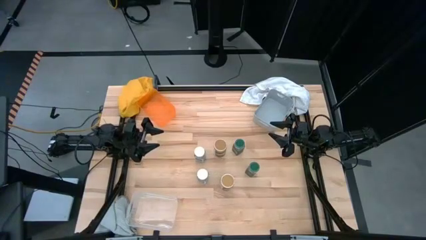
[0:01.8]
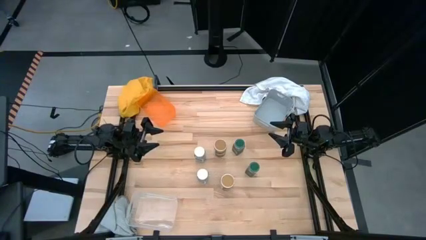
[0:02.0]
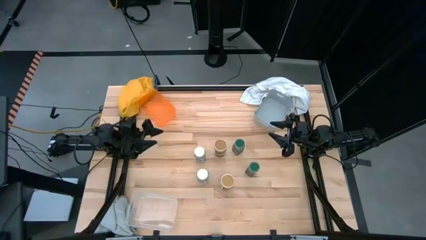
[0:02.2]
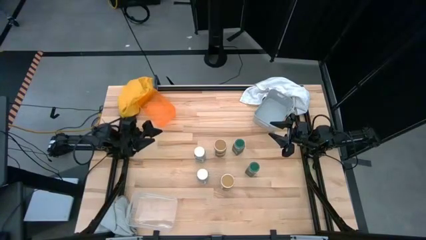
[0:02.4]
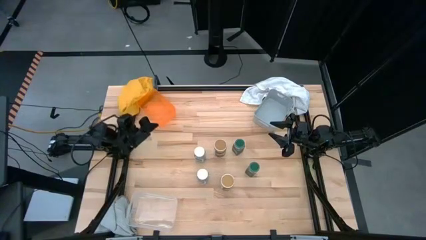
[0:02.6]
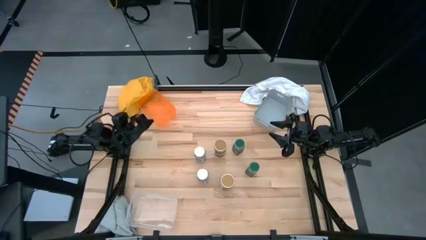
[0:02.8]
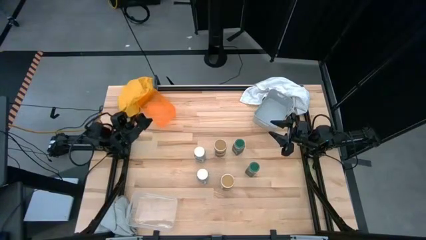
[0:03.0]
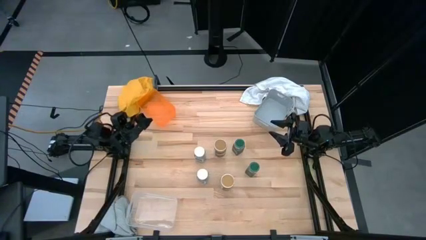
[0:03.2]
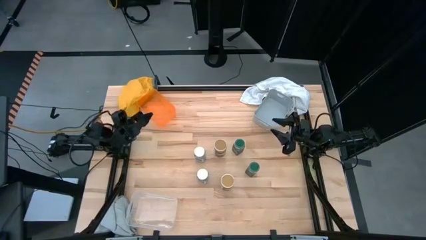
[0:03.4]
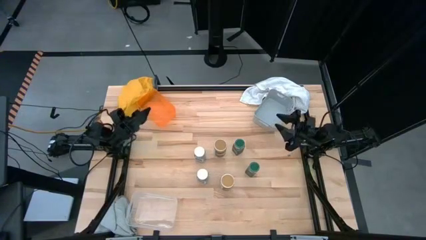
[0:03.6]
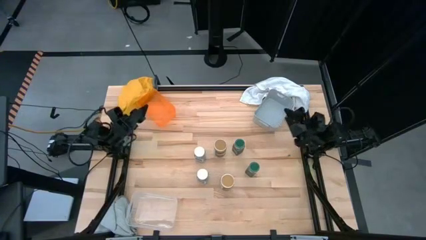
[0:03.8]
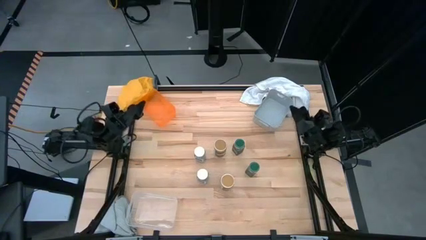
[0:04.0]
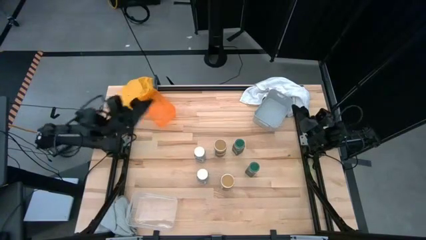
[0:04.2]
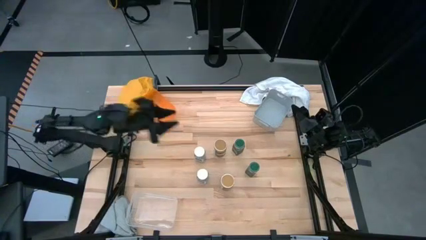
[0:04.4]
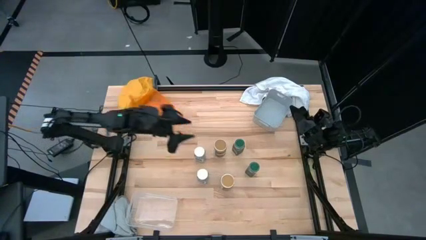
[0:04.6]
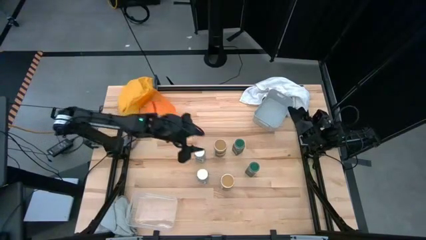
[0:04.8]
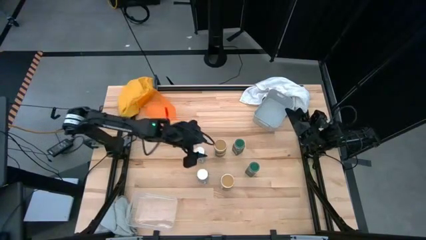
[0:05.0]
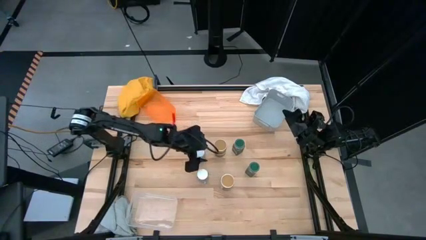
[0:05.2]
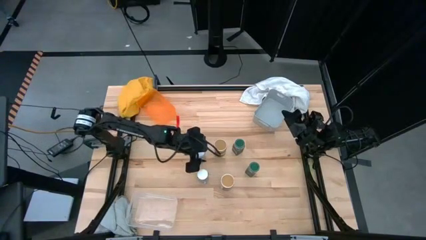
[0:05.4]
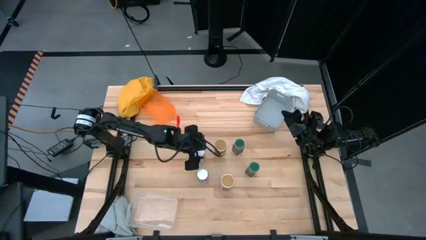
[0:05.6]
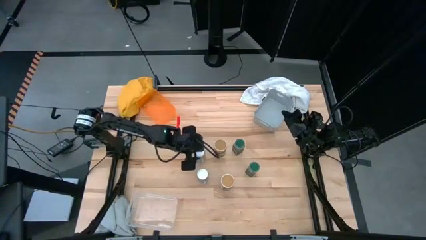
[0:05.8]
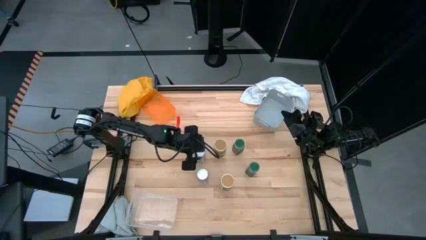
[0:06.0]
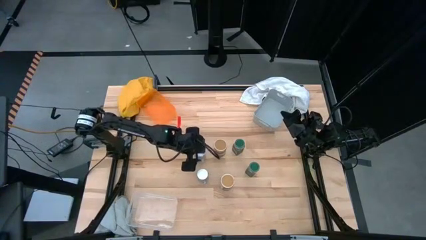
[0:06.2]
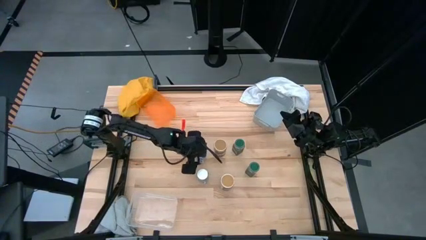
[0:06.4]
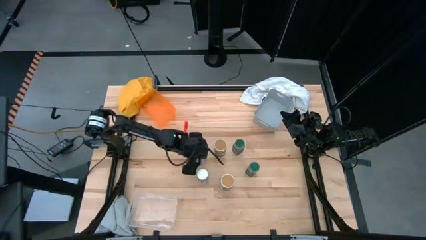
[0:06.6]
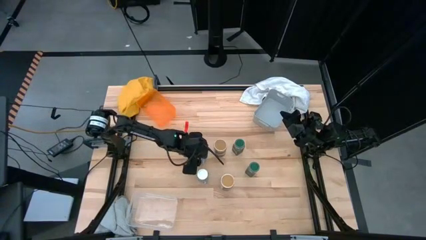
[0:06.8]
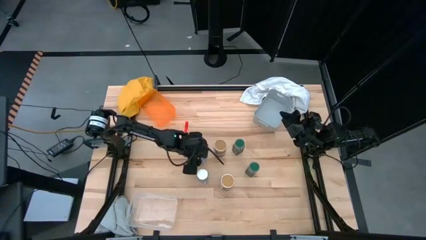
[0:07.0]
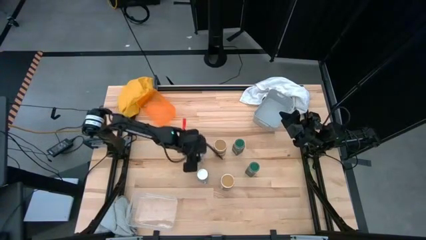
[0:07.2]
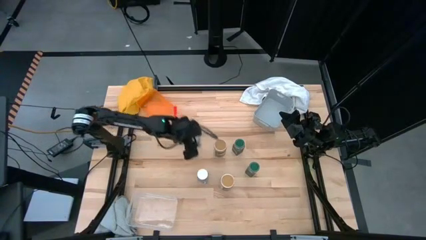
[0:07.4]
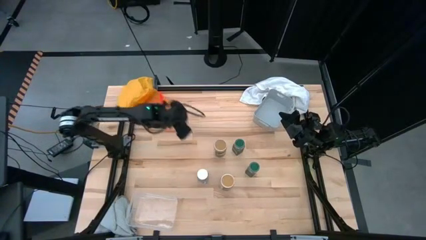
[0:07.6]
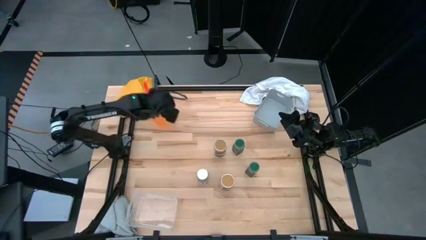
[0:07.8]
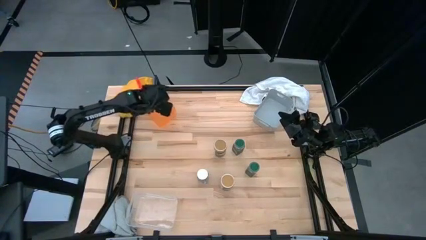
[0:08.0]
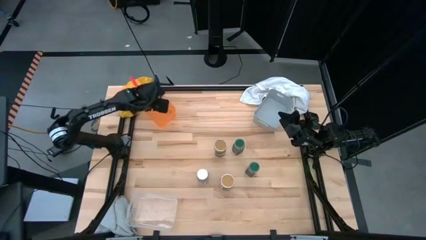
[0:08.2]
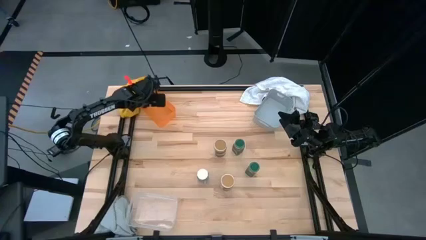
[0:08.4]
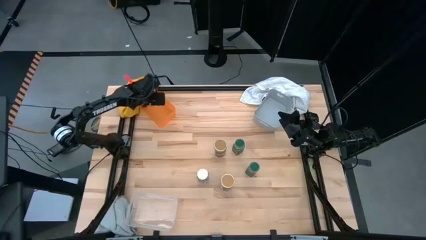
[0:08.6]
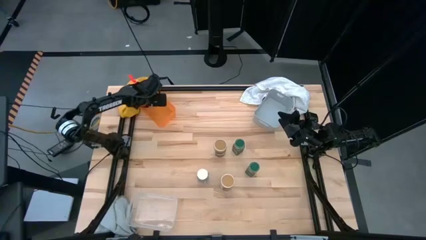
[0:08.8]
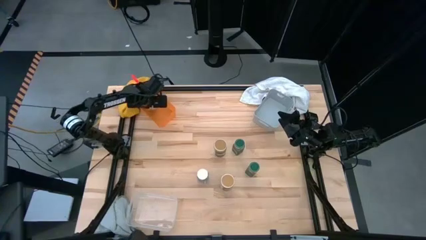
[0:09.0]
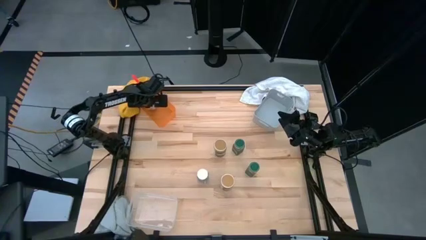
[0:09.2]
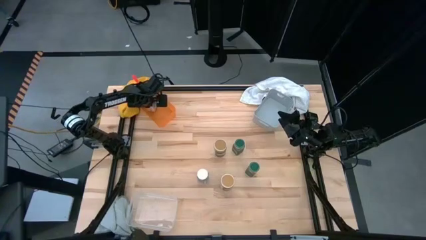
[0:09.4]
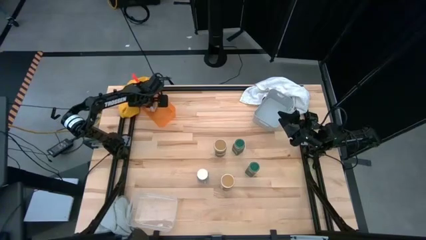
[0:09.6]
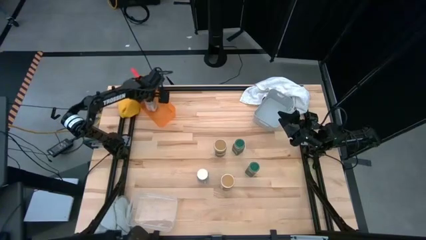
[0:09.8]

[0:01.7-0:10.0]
Task: Sort spices by type
Put the top white seasoning bottle into the orange bin

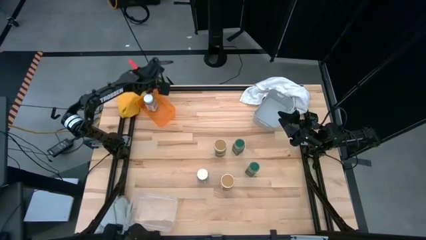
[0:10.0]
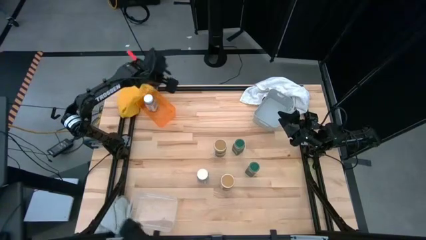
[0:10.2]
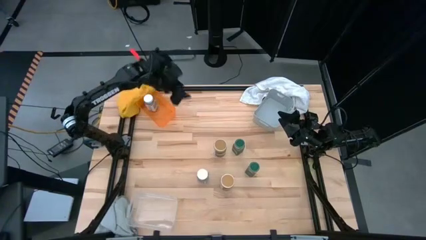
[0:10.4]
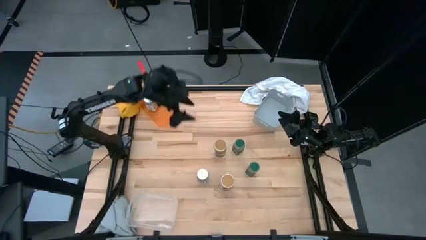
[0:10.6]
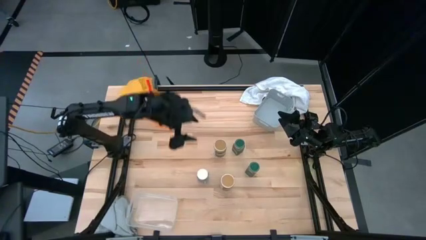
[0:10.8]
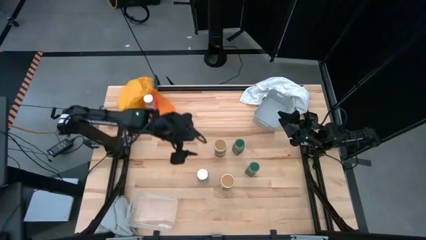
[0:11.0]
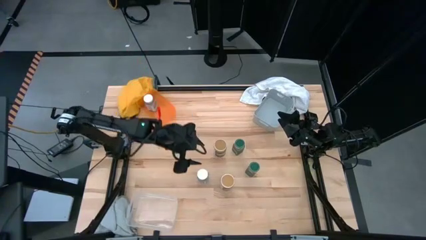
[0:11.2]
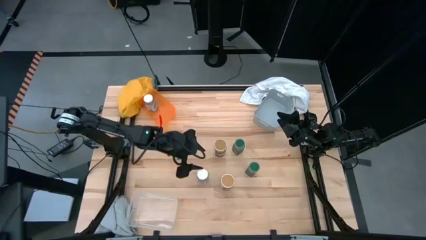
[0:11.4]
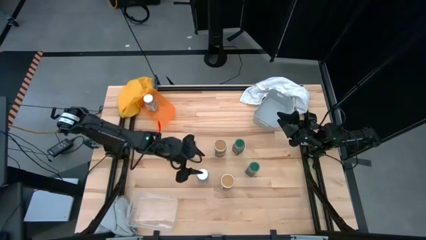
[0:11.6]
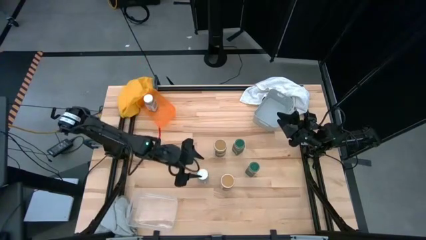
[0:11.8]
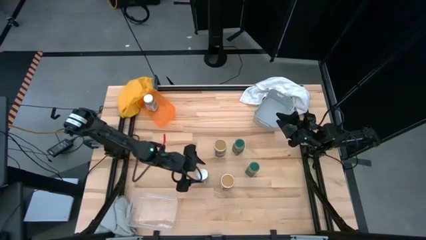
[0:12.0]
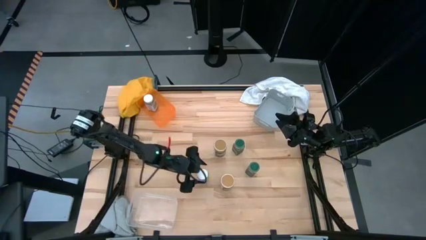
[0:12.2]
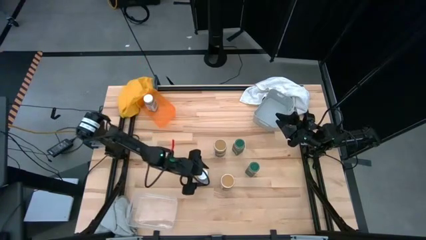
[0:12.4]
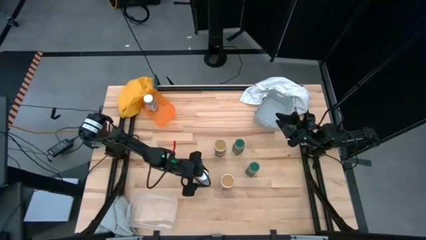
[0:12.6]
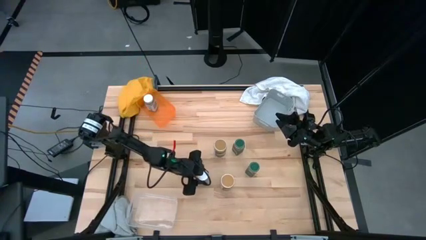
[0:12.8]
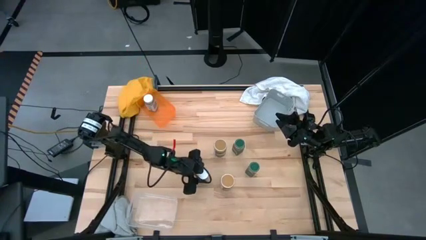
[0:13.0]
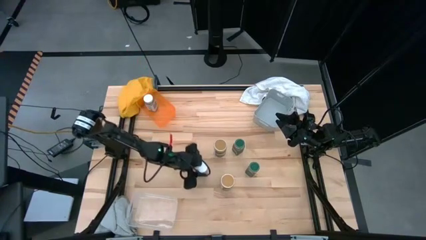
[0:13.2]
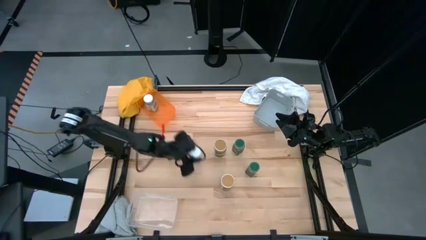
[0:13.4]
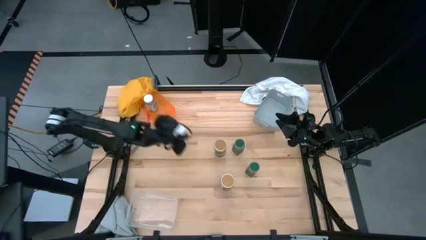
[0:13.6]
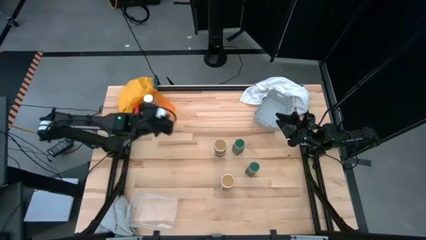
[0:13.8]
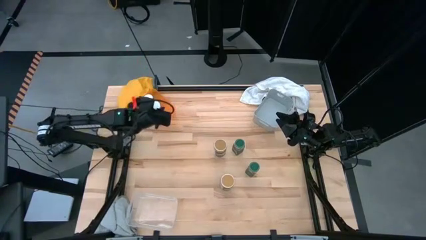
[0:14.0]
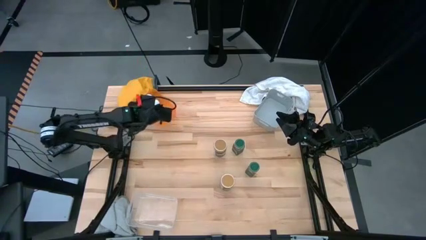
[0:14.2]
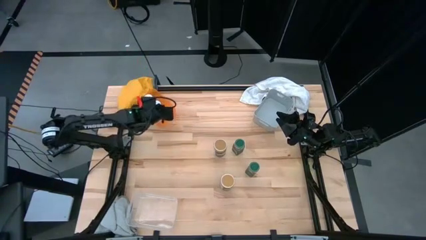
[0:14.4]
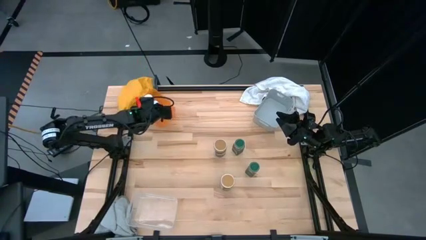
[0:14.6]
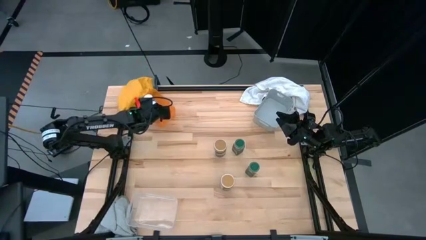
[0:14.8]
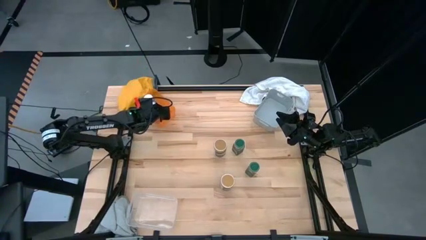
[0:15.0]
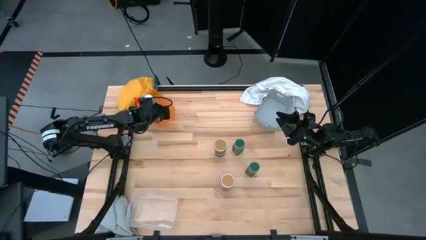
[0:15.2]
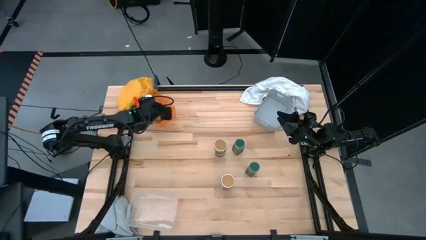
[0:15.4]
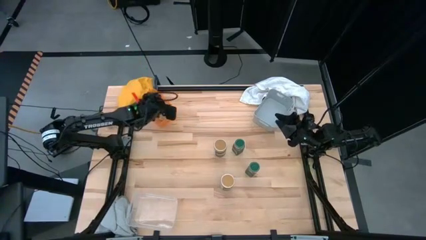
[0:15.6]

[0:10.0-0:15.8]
Put the white seasoning bottle into the orange bin

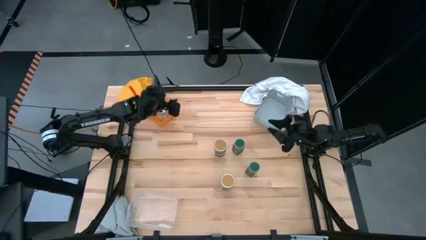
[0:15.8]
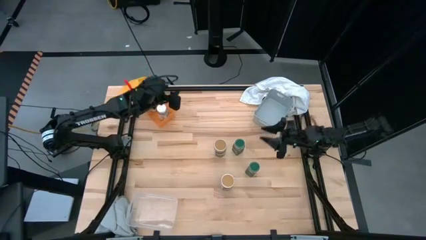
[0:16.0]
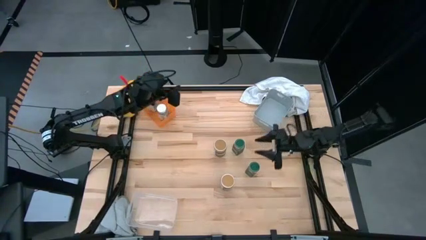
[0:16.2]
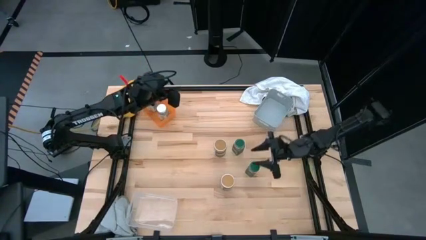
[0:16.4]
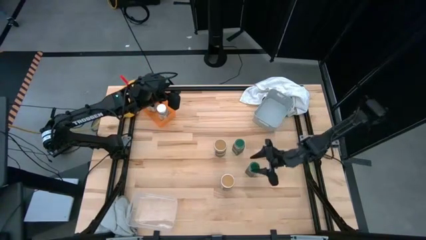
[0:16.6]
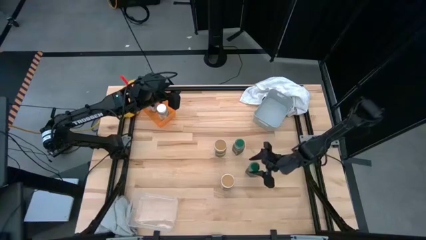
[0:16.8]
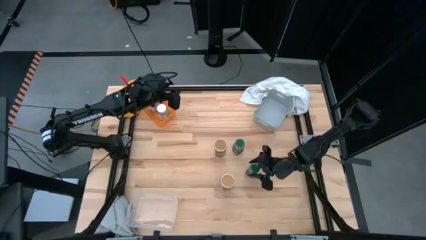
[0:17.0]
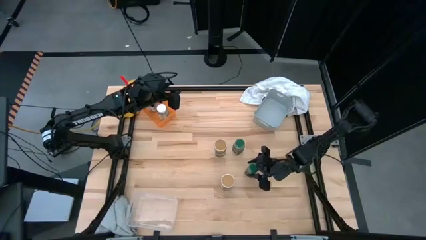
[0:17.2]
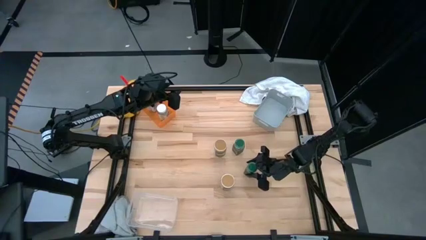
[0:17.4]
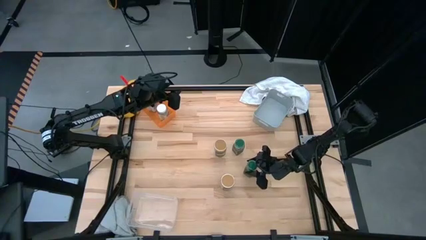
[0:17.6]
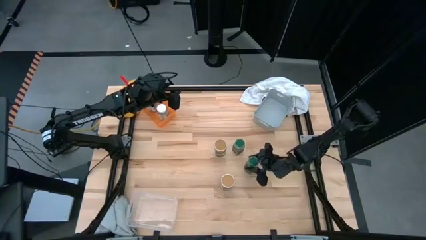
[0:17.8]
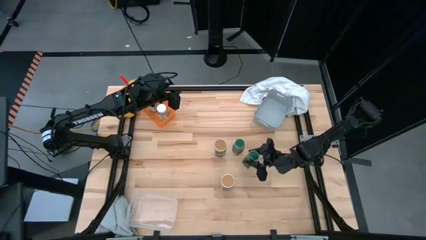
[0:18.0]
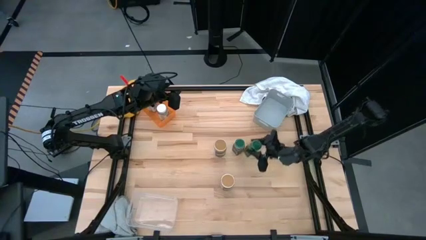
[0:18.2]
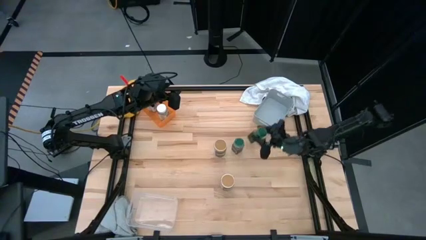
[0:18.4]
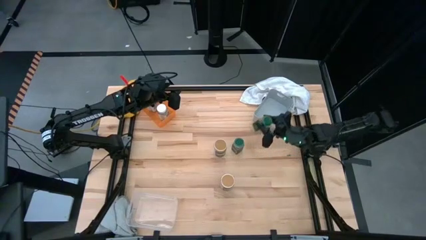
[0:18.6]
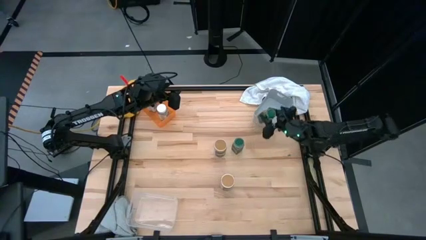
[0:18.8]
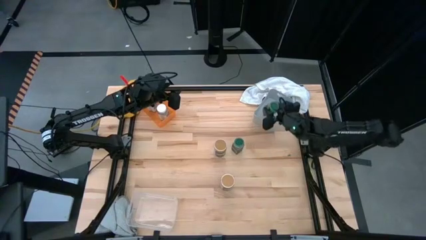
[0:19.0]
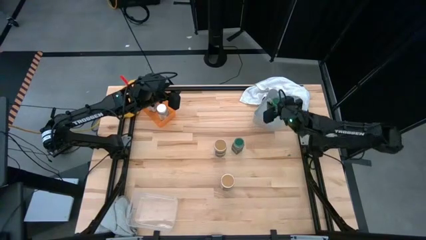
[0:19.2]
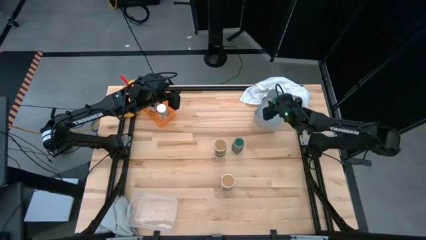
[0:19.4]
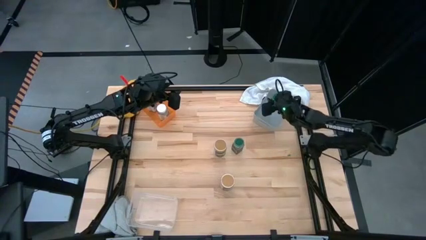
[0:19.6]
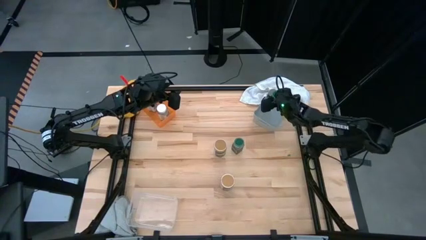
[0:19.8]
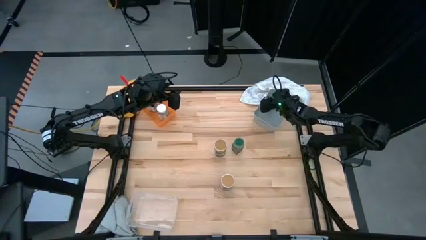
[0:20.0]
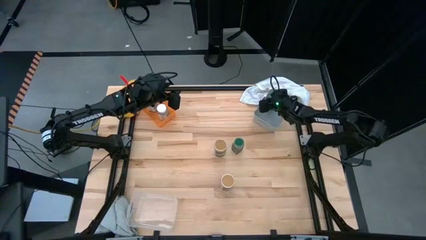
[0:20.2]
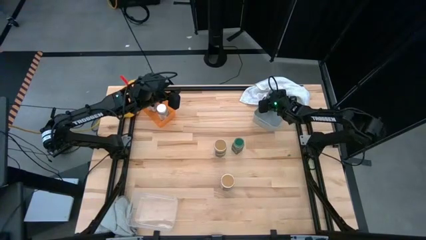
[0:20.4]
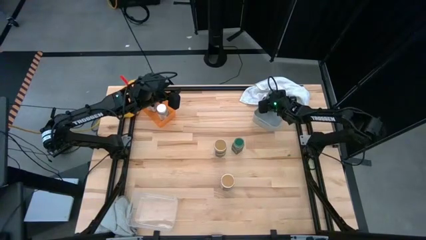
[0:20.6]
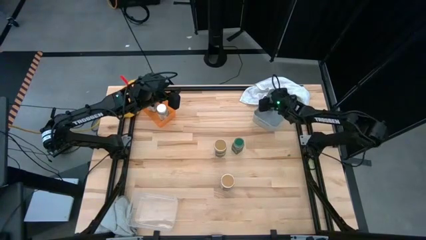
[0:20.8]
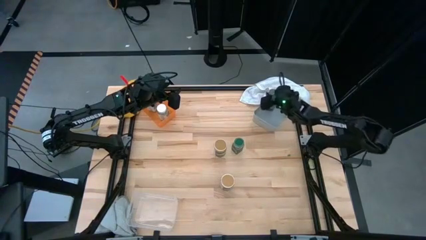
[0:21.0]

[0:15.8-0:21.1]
Put the bottom green seasoning bottle into the gray bin
